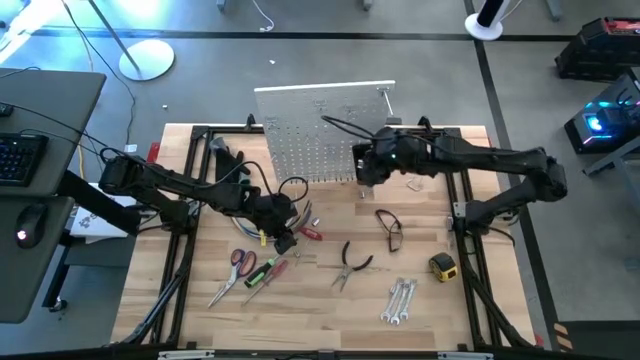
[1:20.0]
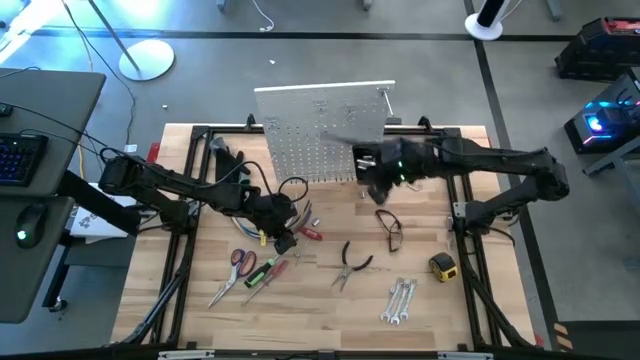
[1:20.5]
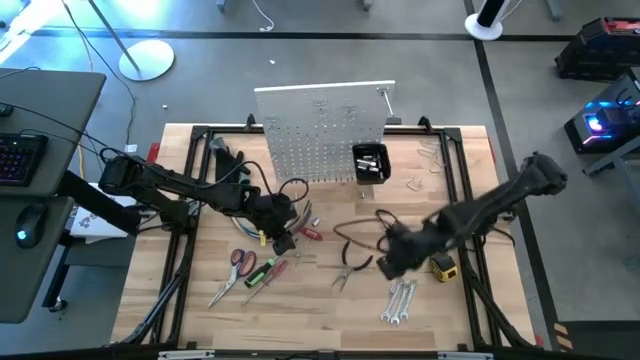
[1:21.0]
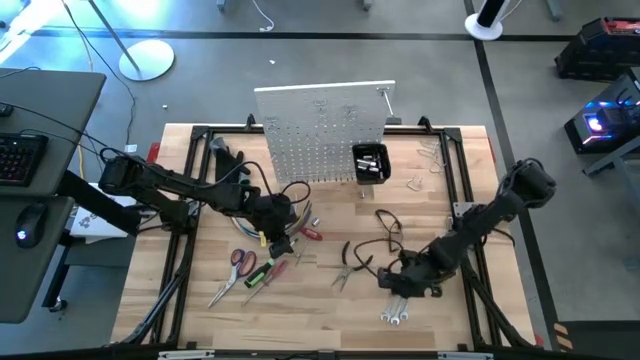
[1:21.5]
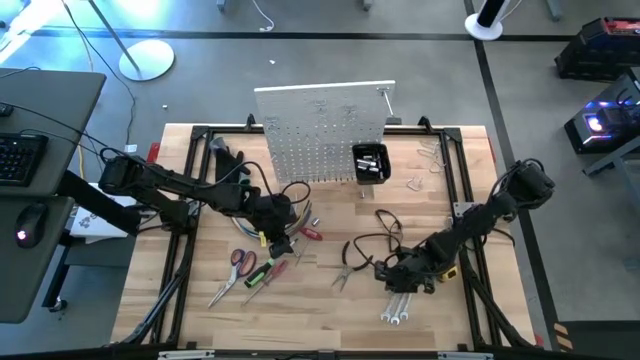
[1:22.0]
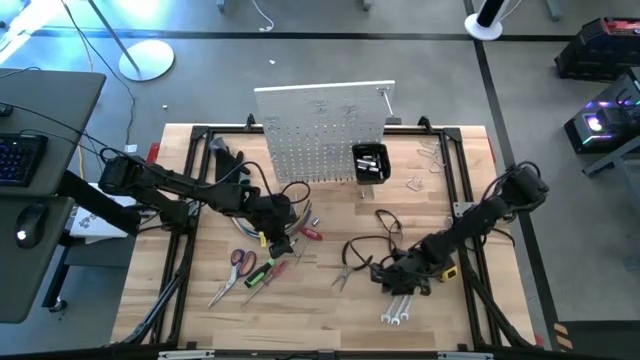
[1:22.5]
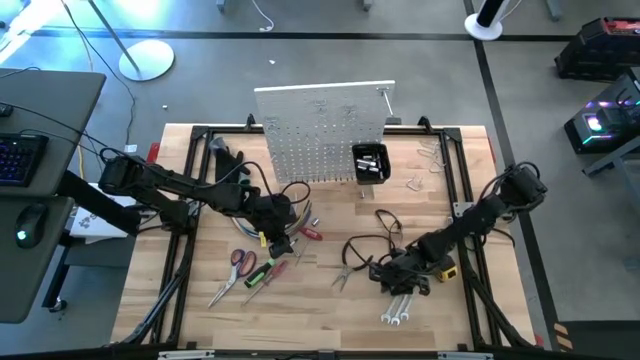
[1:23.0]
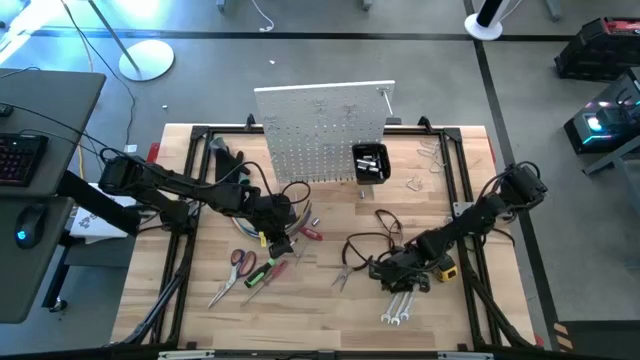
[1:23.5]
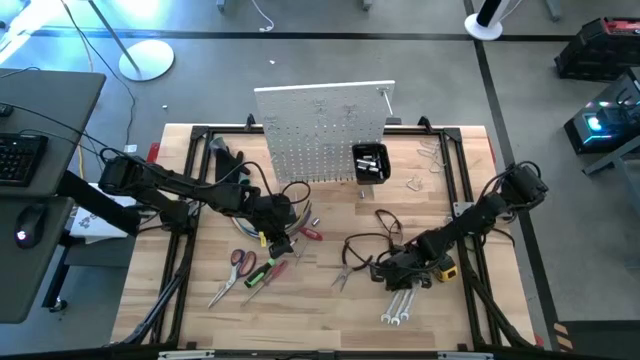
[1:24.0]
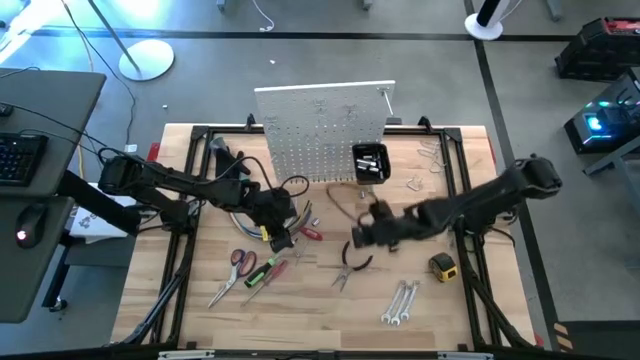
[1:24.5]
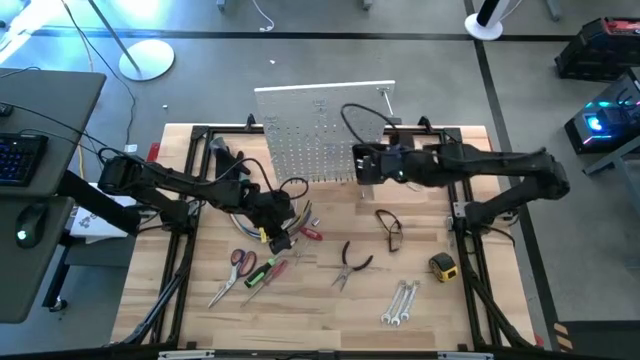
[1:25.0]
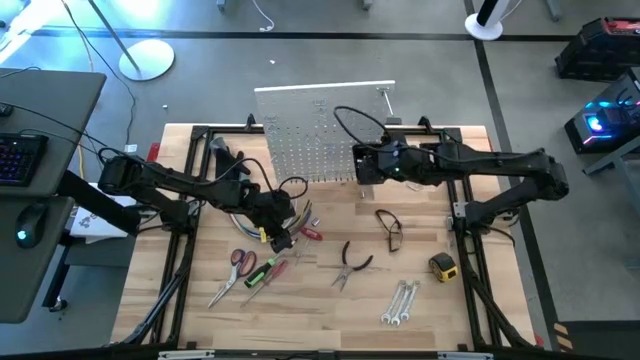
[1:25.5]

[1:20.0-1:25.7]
Task: Hang tools onto peg board
Put the socket into the black bin on the peg board

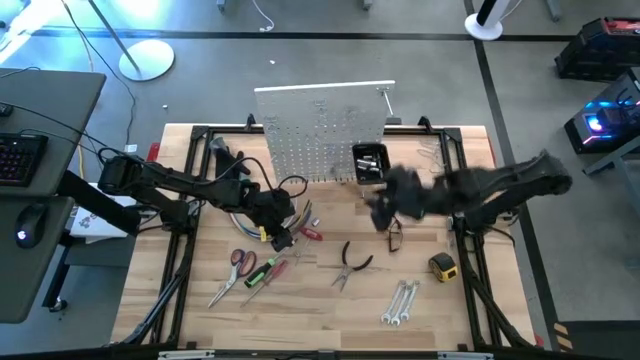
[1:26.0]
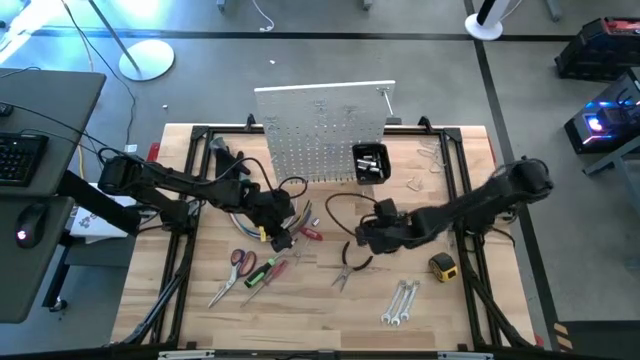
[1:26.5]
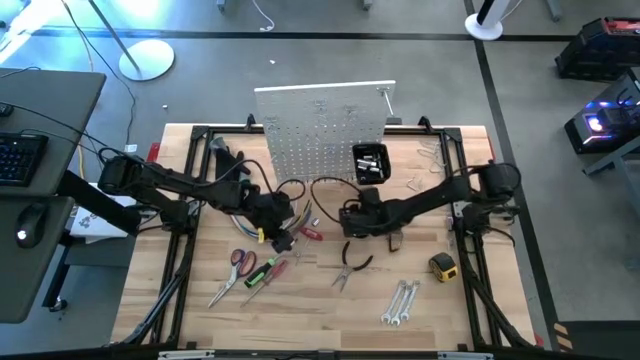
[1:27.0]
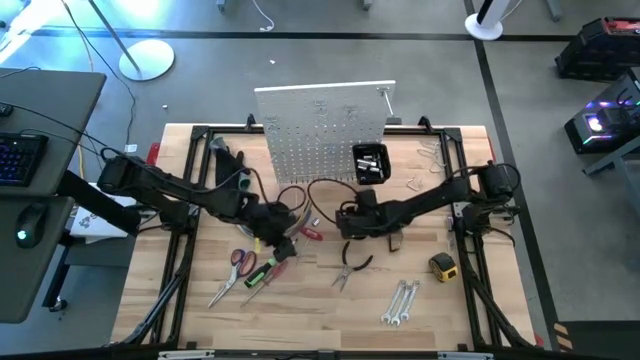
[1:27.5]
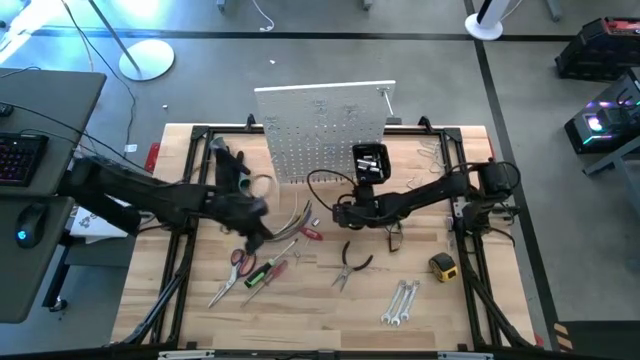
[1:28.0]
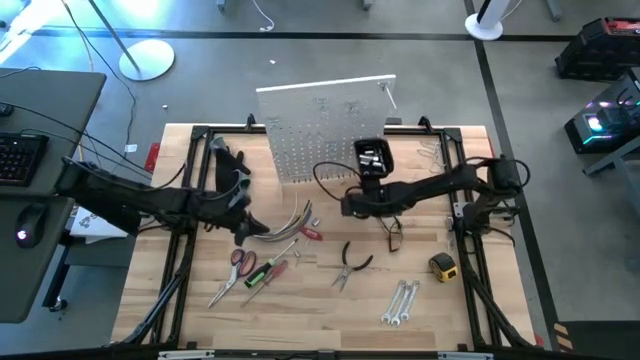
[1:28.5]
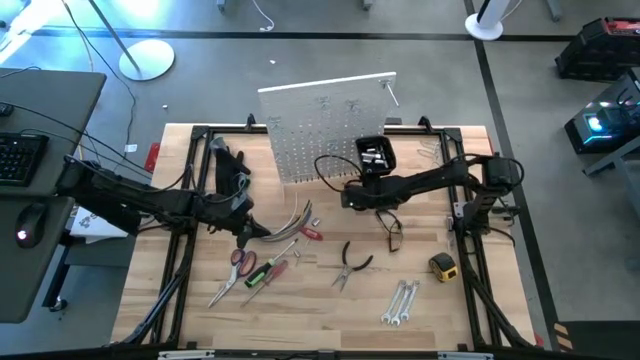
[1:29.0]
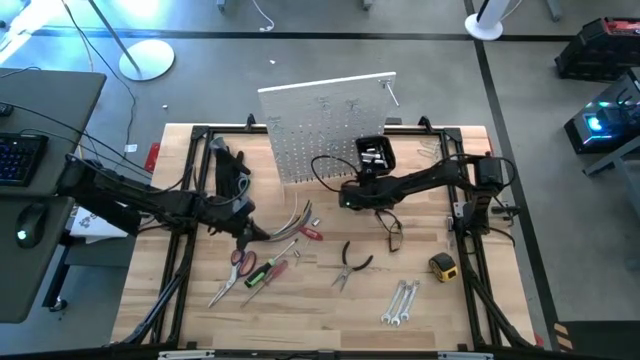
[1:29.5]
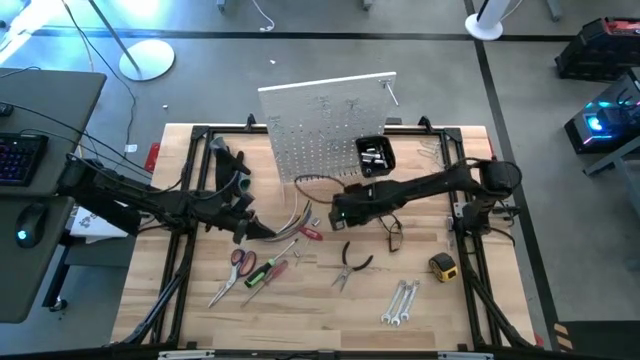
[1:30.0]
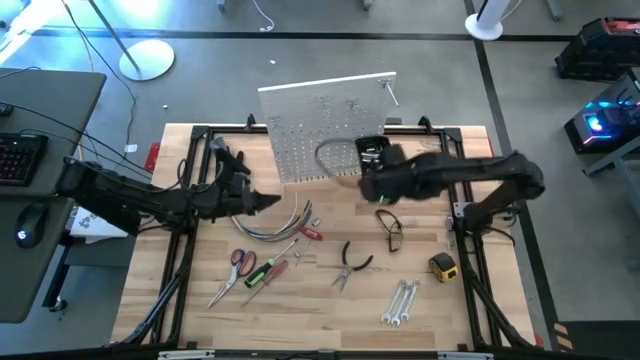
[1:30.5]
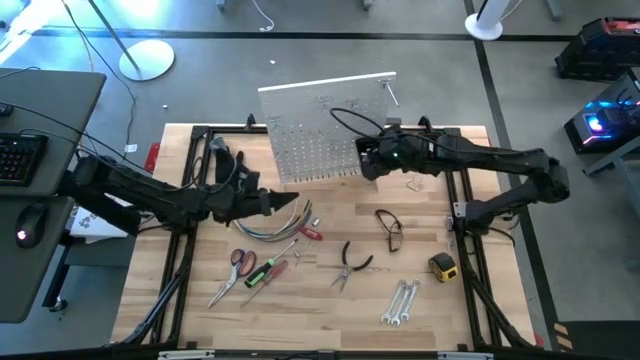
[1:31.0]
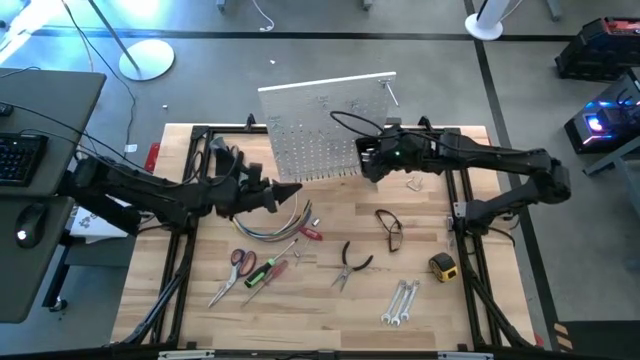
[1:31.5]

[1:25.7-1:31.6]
Put the socket into the black bin on the peg board

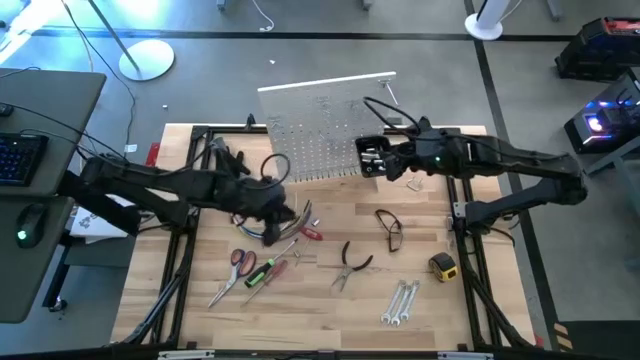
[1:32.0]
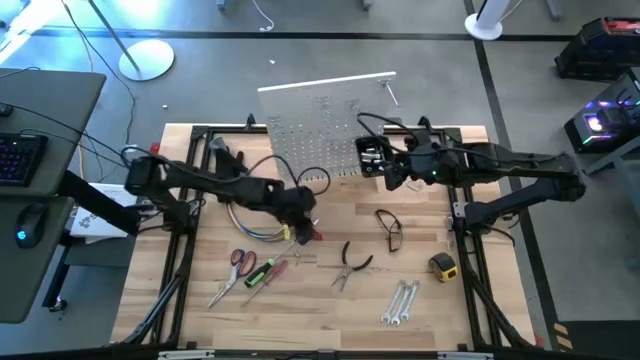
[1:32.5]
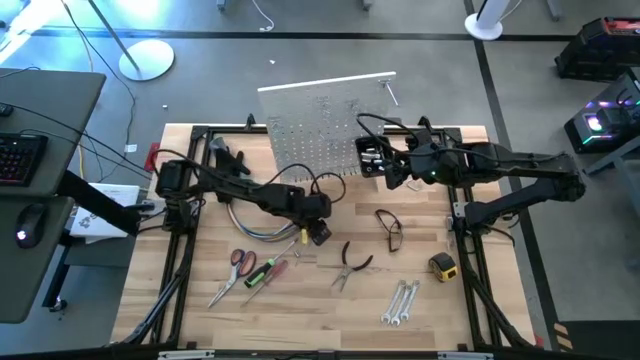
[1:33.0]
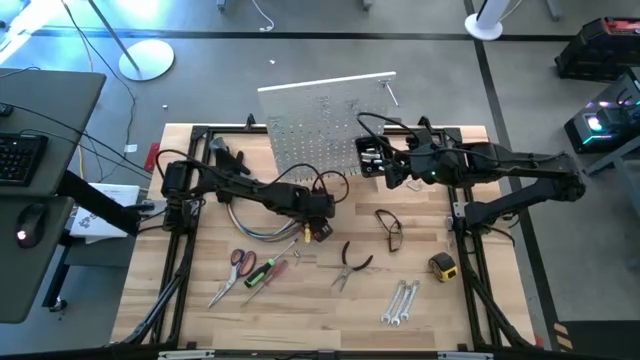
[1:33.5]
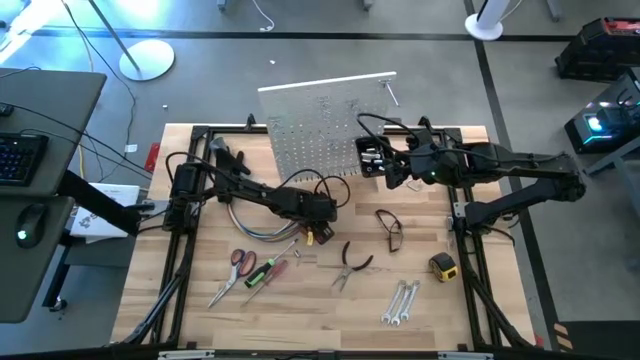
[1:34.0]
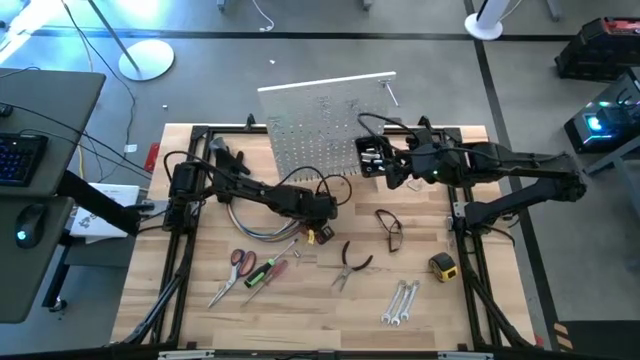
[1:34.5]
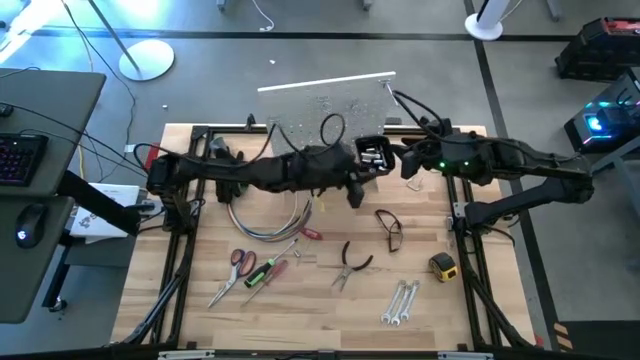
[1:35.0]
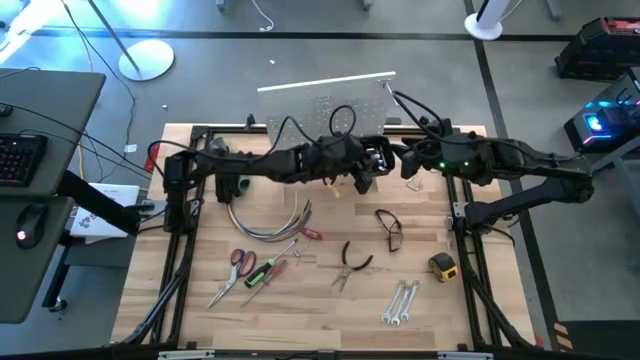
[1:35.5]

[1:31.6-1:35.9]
Put the socket into the black bin on the peg board

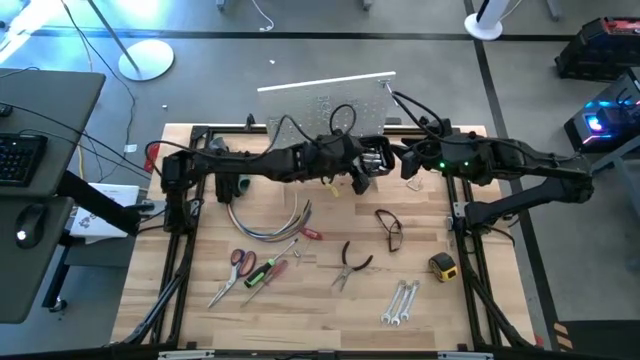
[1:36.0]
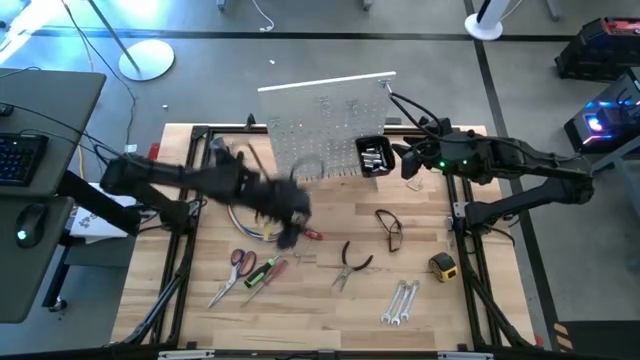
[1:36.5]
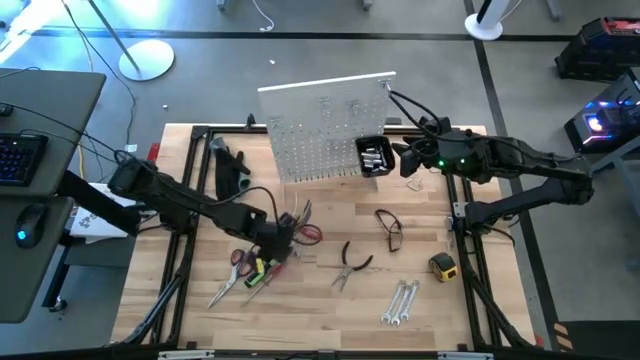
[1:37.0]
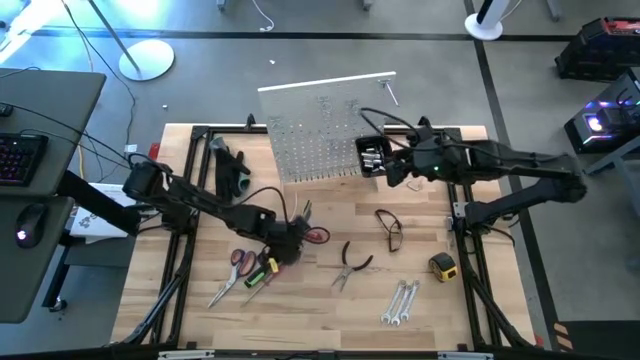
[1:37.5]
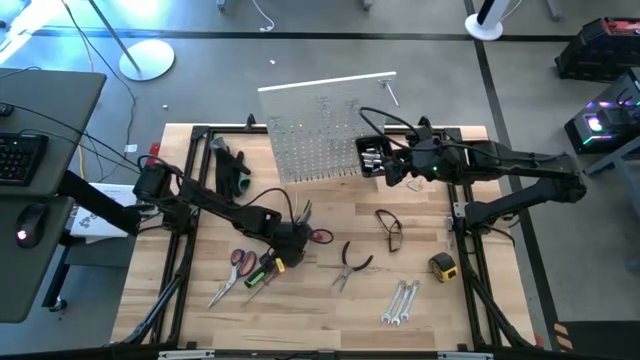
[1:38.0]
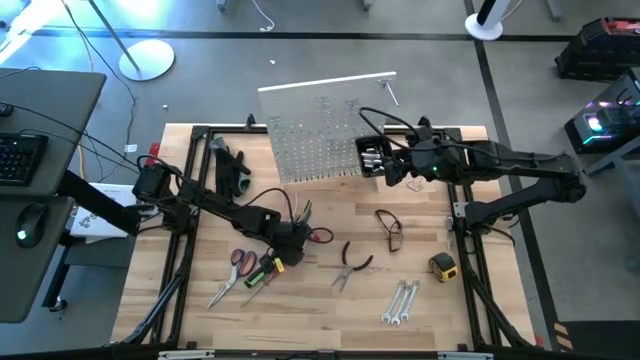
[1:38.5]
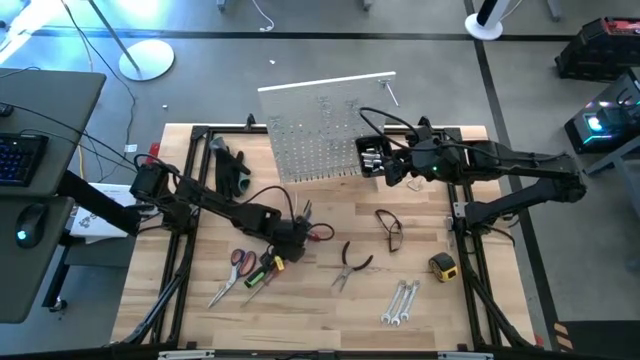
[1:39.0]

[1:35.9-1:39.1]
Put the socket into the black bin on the peg board

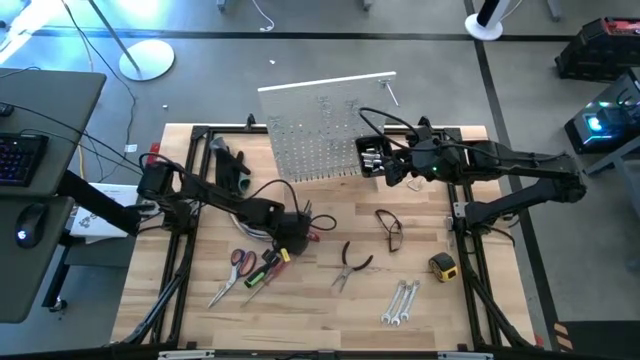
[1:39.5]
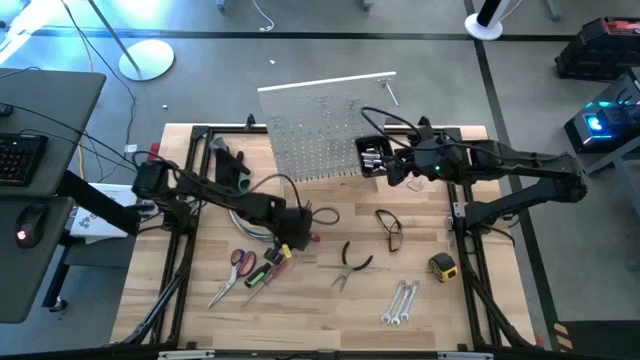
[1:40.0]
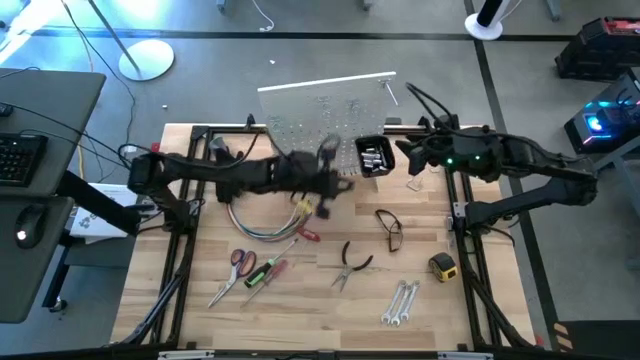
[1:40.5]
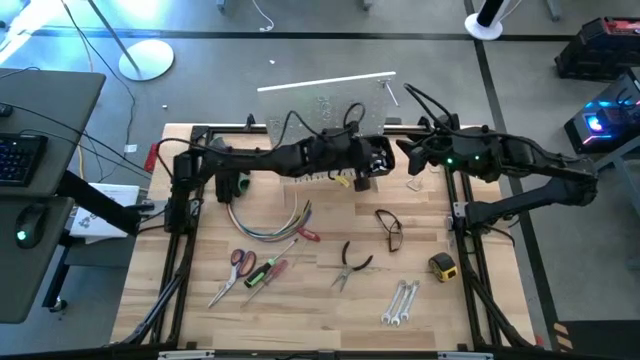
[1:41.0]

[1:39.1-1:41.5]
Put the socket into the black bin on the peg board
